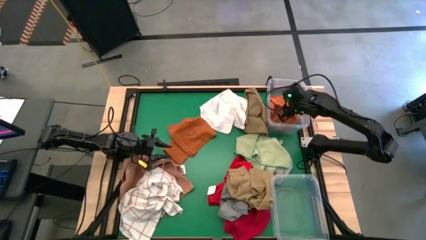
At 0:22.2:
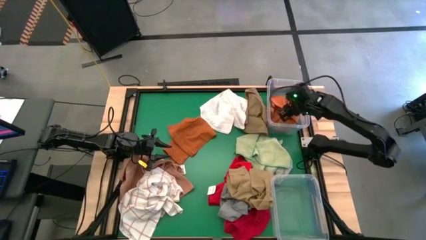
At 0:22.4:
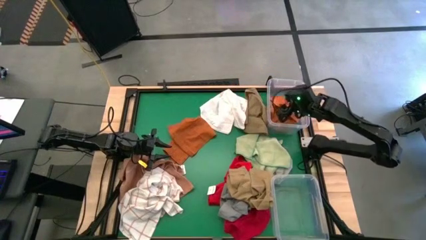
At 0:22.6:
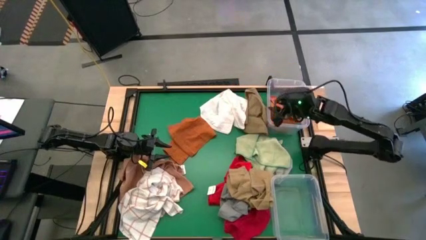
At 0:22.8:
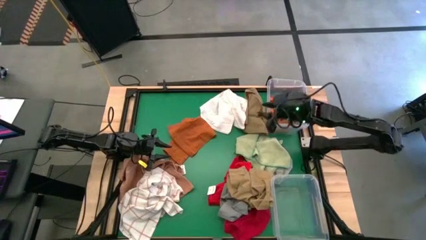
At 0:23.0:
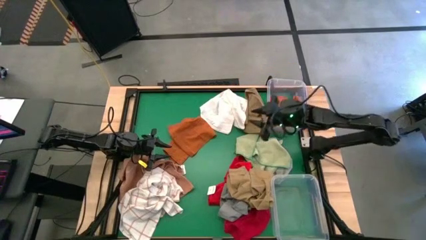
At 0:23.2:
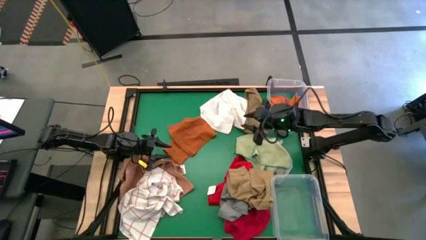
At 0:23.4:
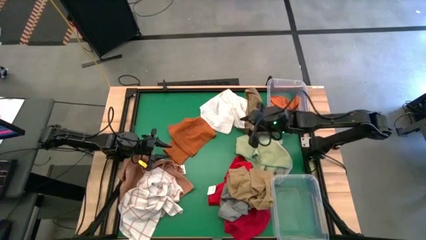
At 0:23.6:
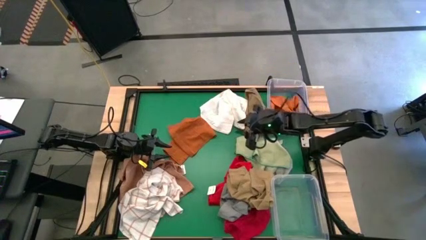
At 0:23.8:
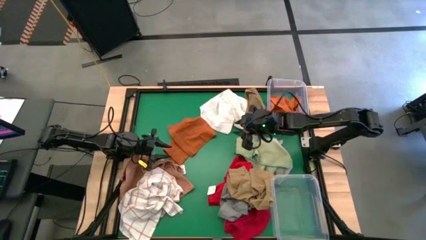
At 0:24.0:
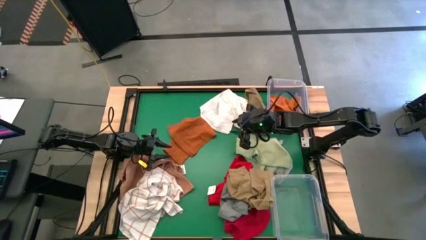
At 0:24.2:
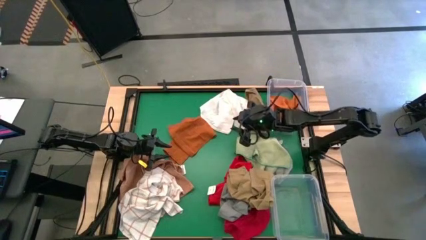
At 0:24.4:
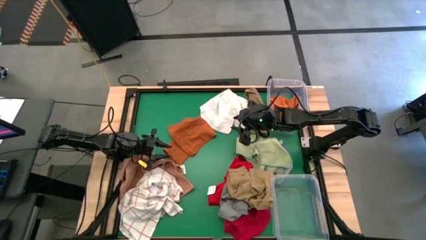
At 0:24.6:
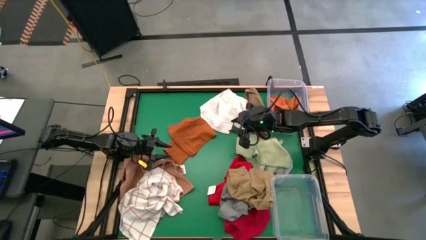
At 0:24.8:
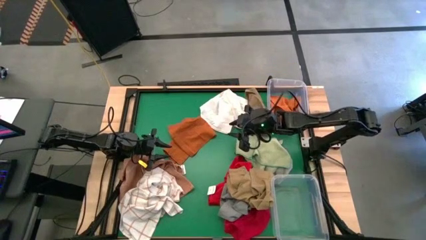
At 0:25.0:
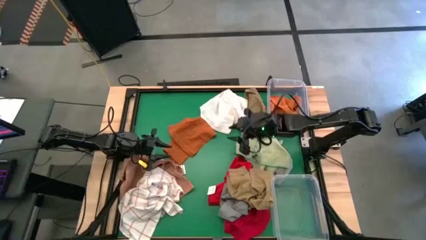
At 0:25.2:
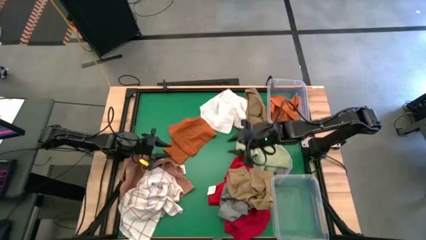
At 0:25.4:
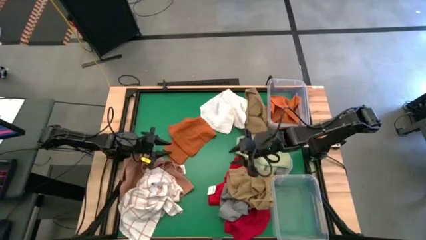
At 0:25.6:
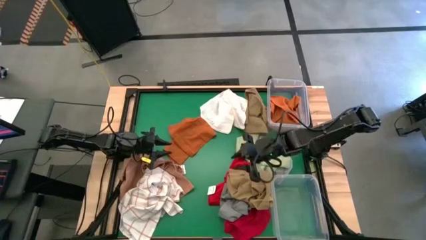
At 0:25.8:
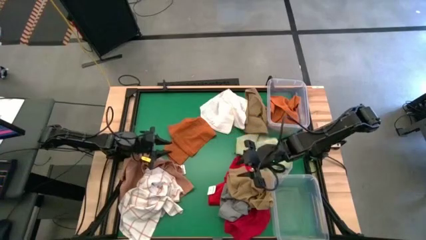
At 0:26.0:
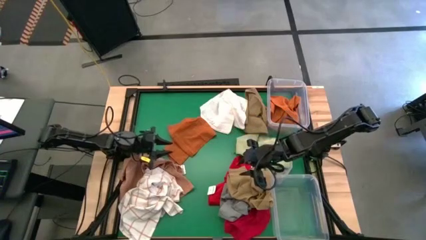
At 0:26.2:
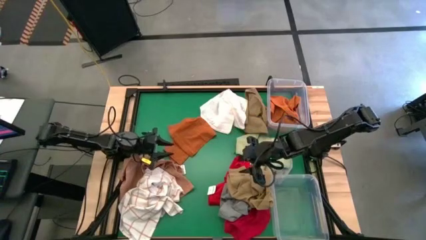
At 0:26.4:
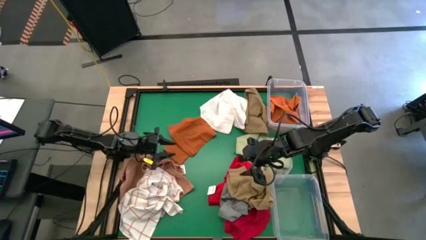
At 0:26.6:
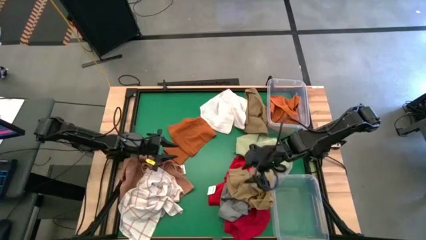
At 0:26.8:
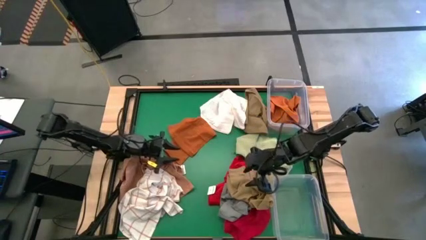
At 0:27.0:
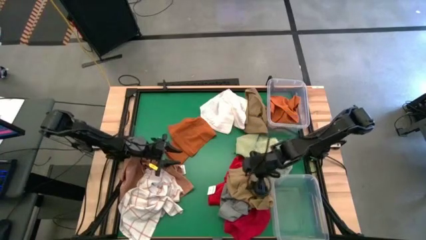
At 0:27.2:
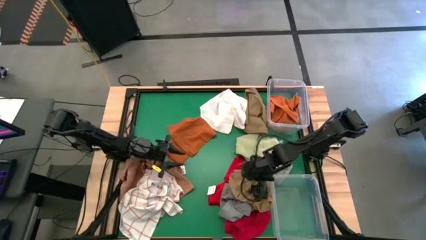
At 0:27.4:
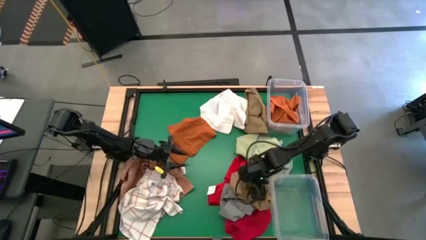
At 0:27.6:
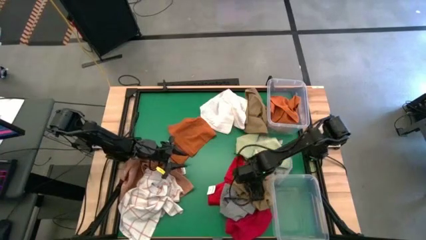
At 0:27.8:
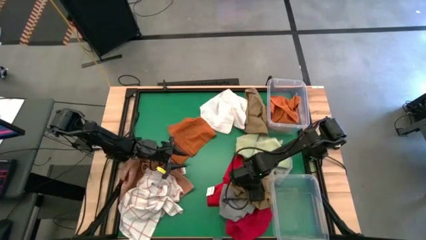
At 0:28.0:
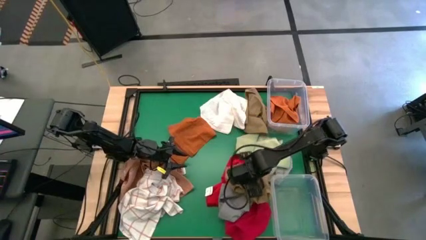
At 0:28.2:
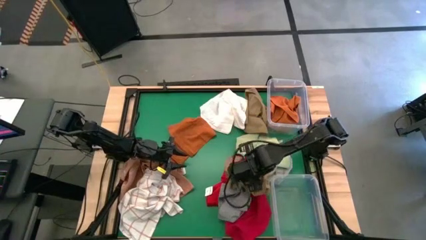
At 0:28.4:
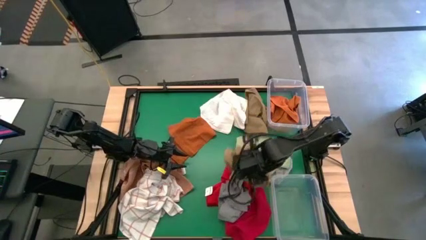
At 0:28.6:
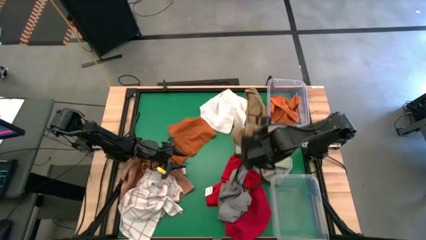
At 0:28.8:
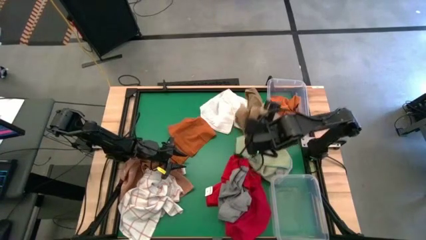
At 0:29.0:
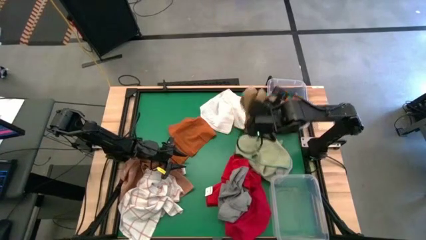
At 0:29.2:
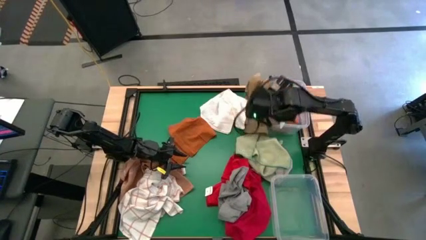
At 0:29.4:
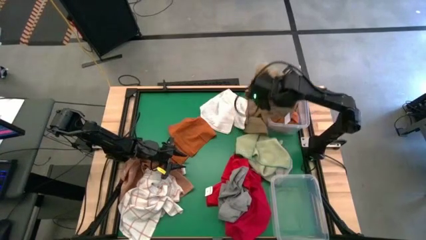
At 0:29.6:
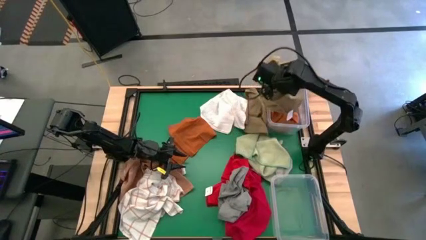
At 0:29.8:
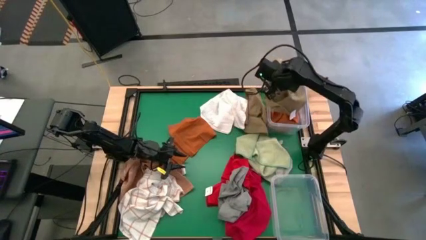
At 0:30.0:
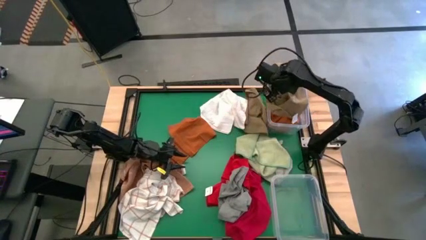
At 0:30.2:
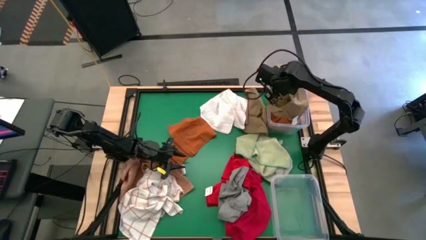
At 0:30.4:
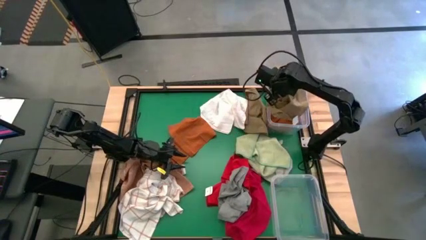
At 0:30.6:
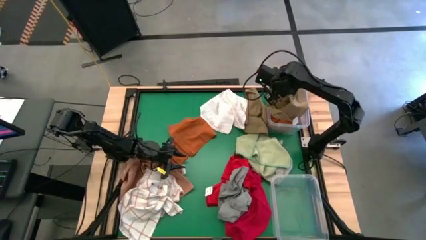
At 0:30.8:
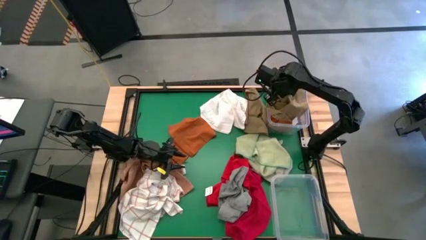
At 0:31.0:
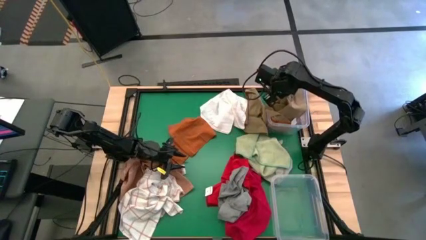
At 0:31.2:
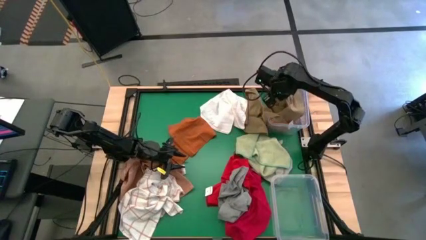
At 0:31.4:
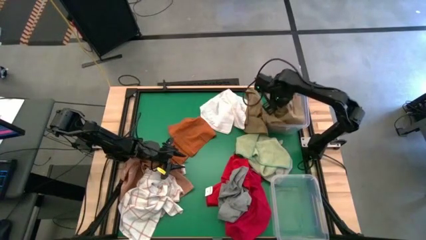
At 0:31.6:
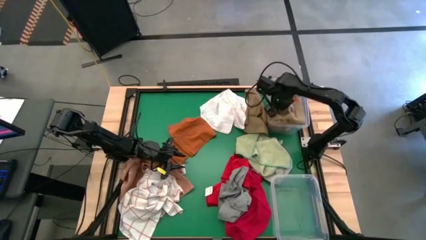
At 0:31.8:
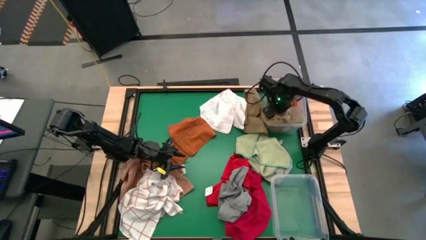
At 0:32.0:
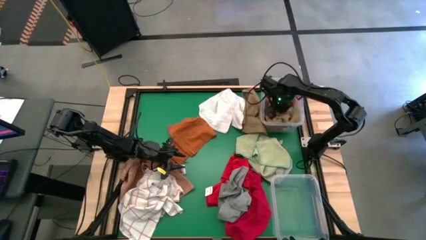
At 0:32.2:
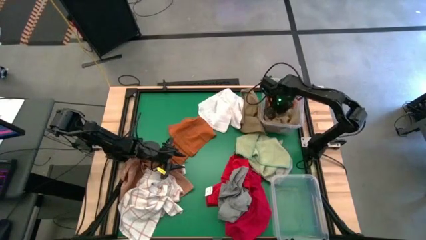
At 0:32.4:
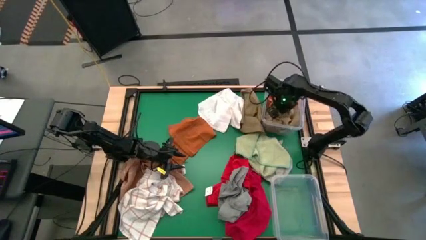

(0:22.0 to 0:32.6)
Task: Sort towels by color in basket
Put the bottom light brown towel into the top transparent bin

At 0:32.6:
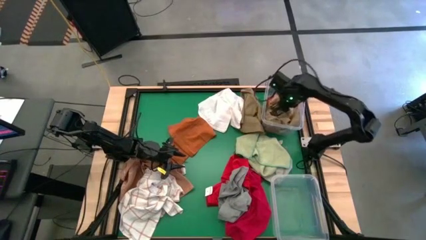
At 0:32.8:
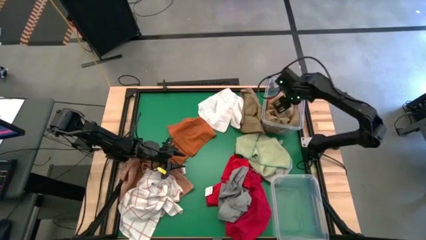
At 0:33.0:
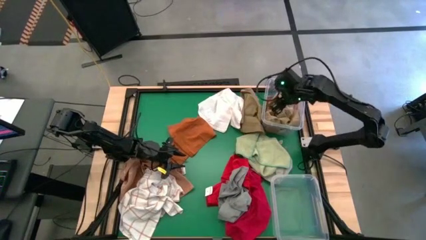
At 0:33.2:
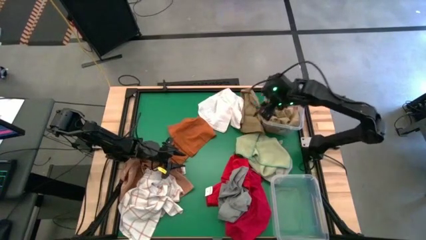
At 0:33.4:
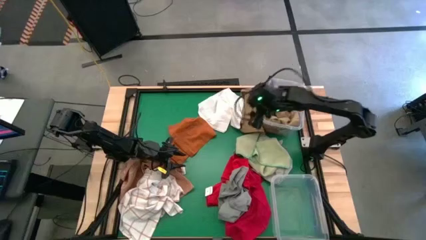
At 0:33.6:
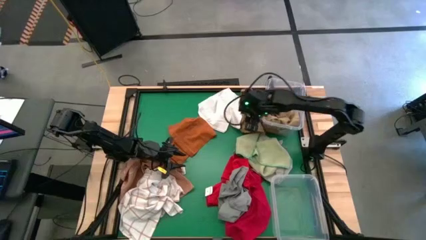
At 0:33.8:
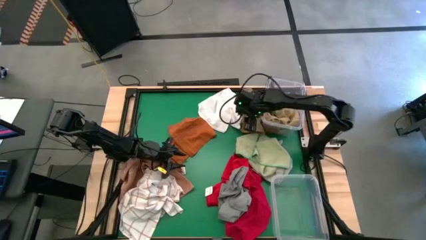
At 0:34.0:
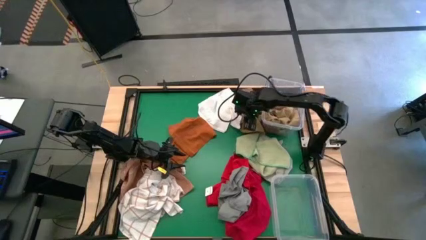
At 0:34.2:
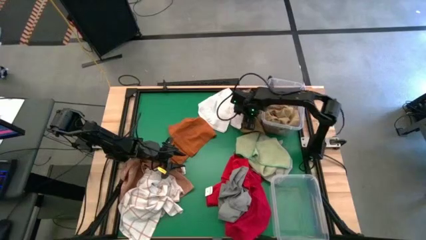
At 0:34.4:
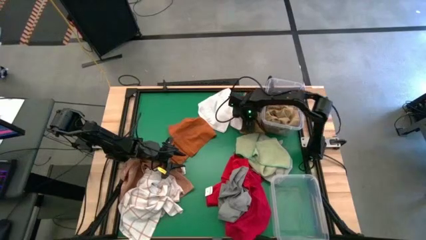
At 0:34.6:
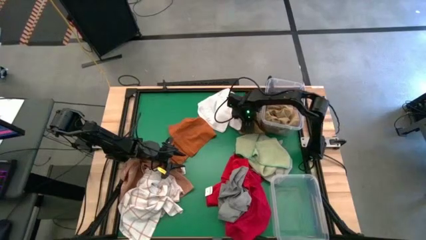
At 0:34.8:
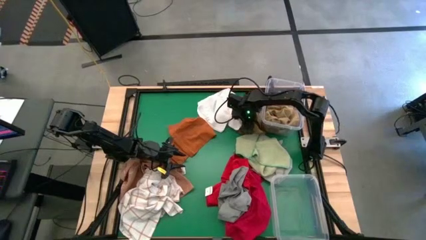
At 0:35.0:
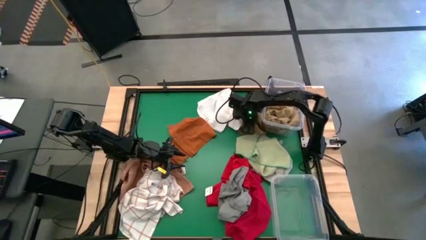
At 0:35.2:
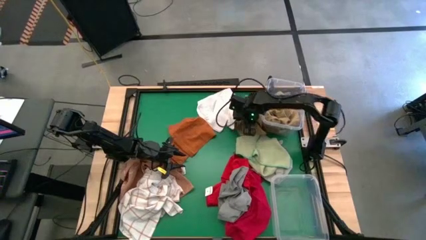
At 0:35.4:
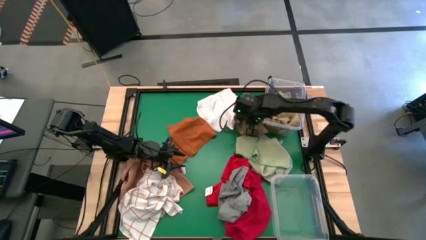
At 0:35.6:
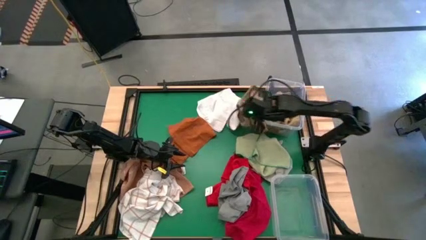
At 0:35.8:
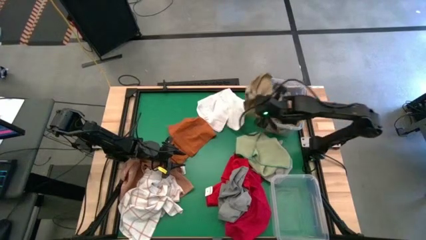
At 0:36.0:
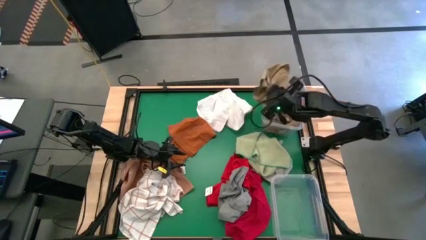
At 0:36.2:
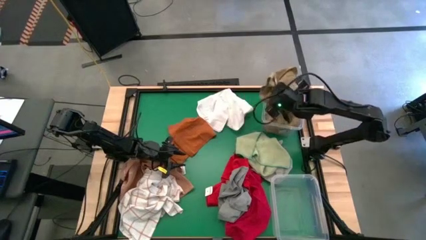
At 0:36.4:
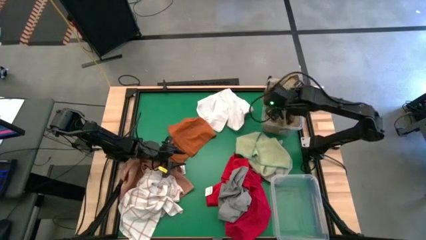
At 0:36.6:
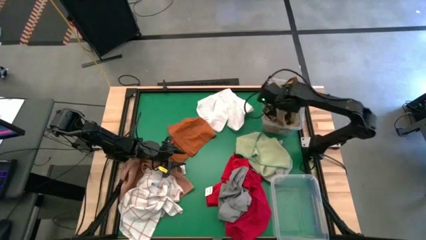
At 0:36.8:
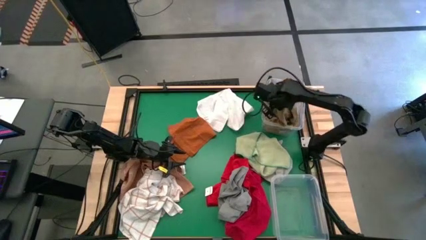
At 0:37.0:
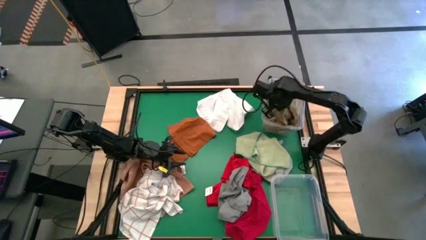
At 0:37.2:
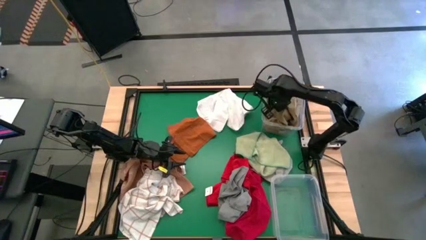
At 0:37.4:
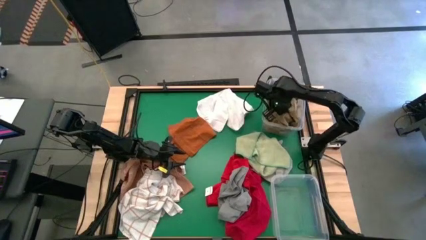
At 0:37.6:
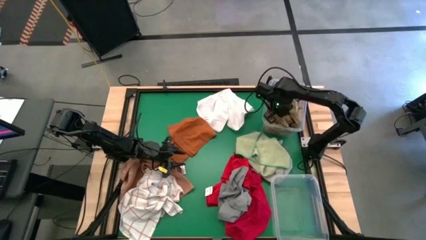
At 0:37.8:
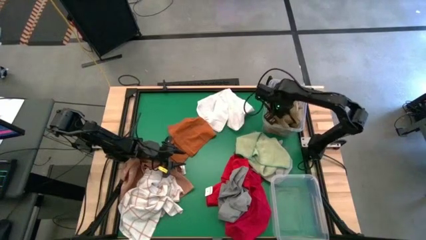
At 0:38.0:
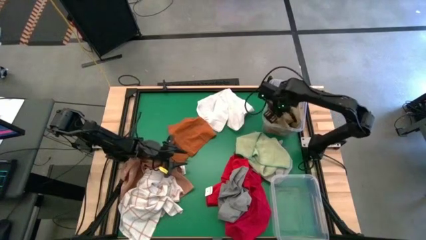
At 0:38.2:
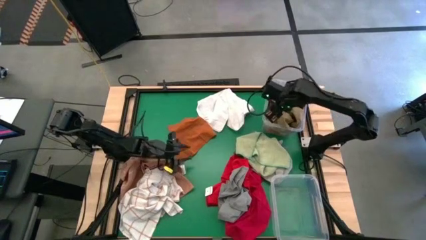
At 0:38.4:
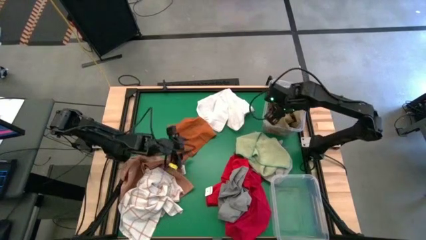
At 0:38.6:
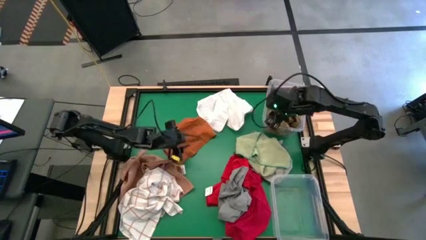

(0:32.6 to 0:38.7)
Put the light brown towel into the top transparent bin
